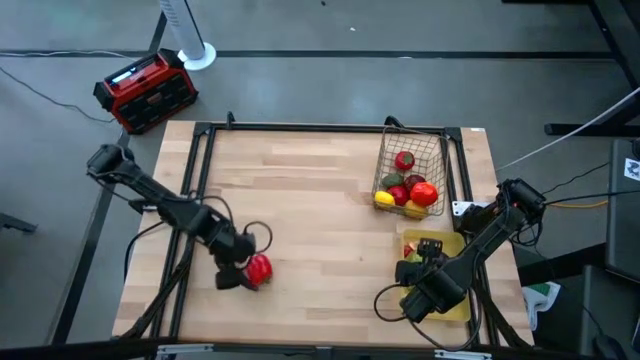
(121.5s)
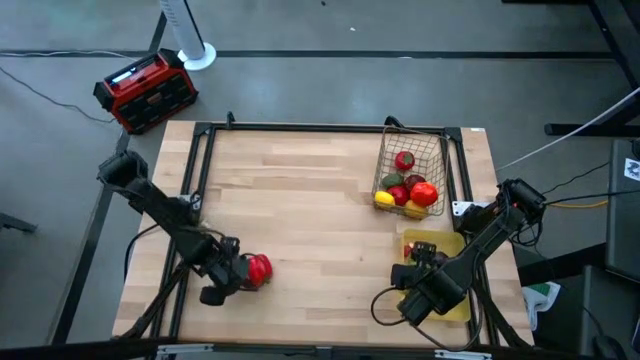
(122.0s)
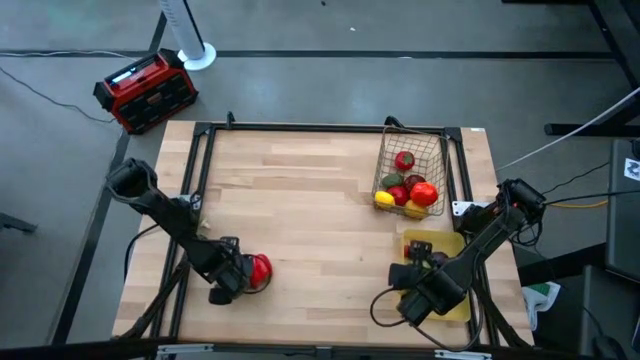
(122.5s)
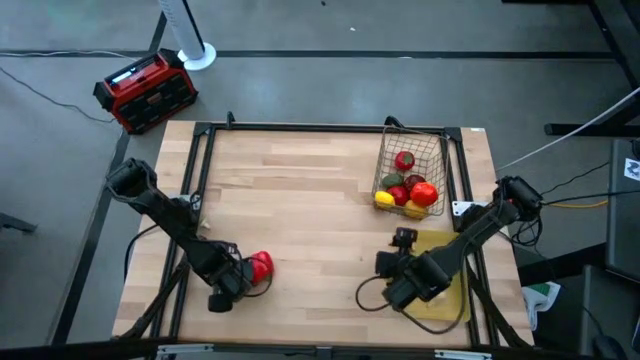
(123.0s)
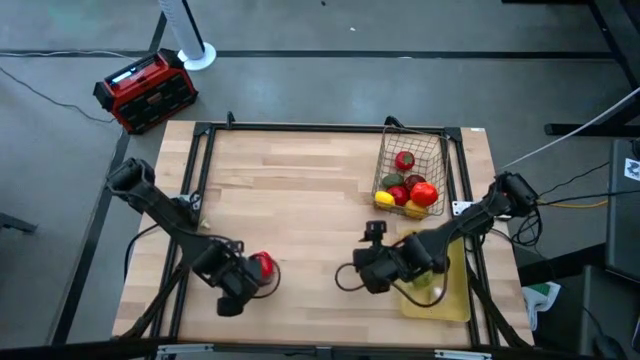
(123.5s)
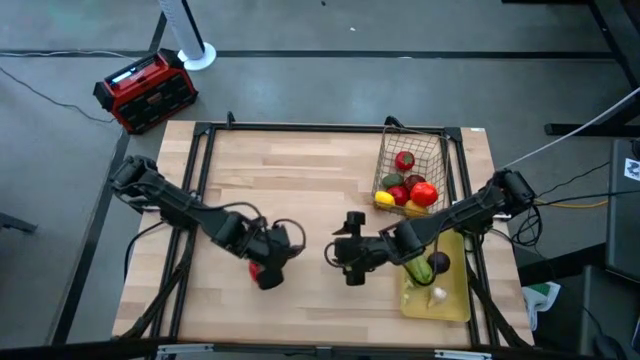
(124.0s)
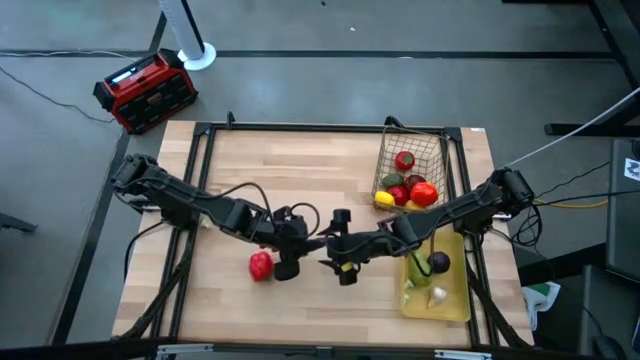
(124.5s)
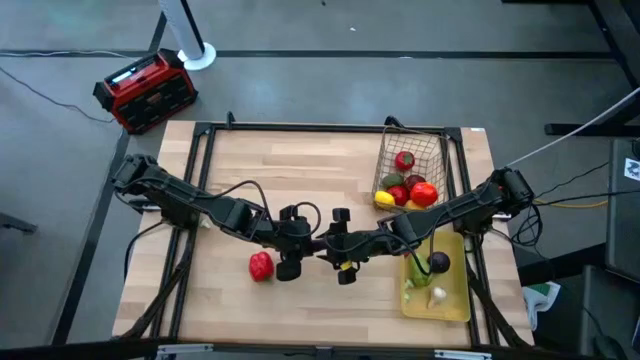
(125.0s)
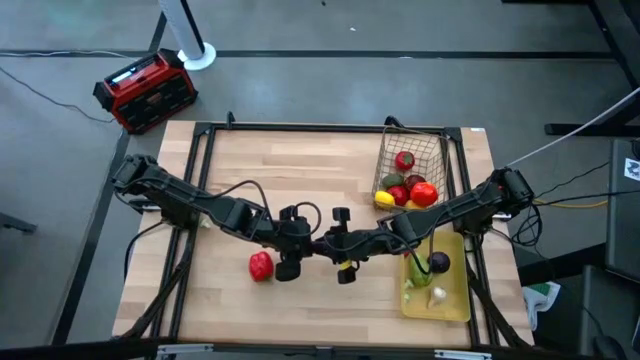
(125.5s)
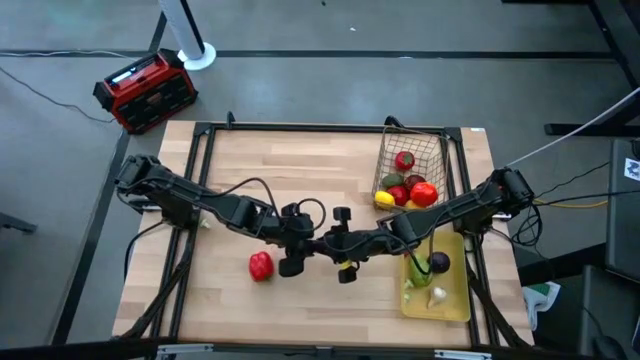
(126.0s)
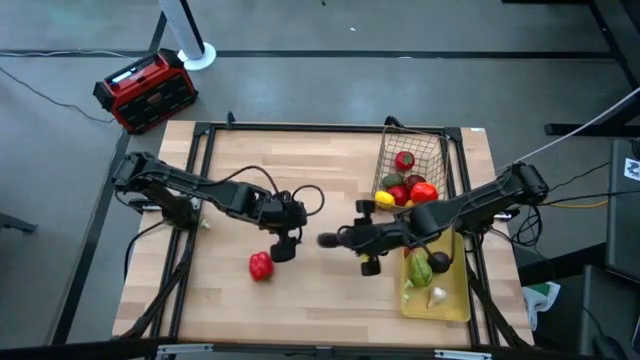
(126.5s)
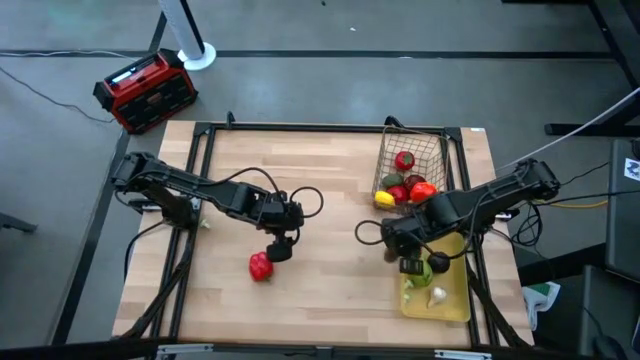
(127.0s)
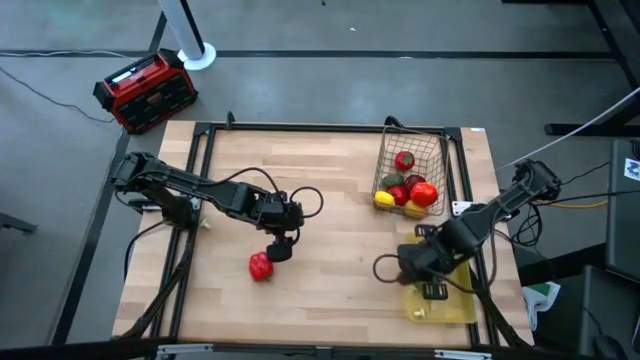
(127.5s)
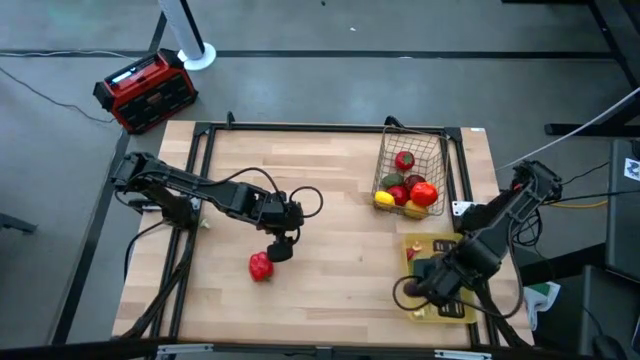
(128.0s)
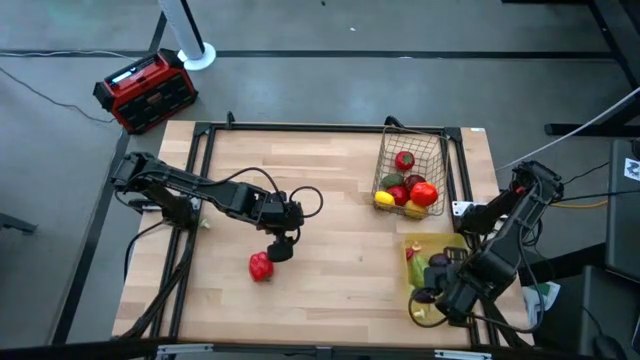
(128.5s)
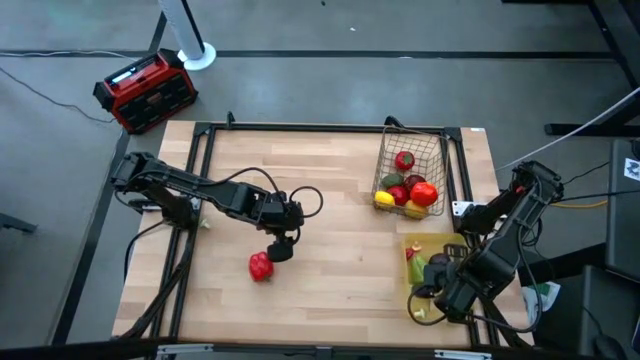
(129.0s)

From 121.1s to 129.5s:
Task: Sort produce into baskets
Put the eggplant into the yellow bin

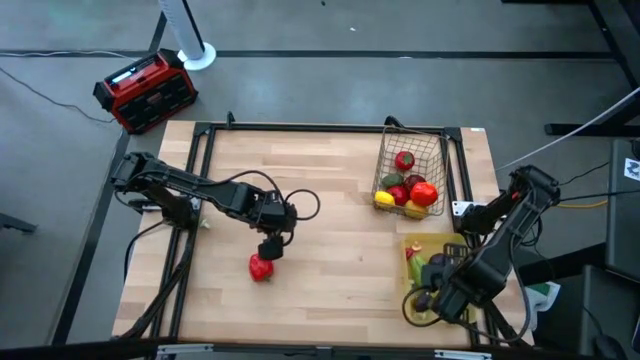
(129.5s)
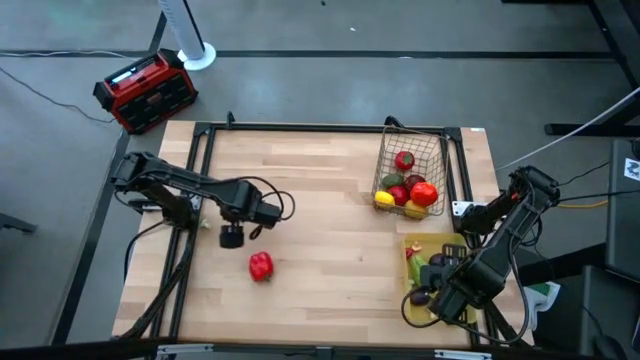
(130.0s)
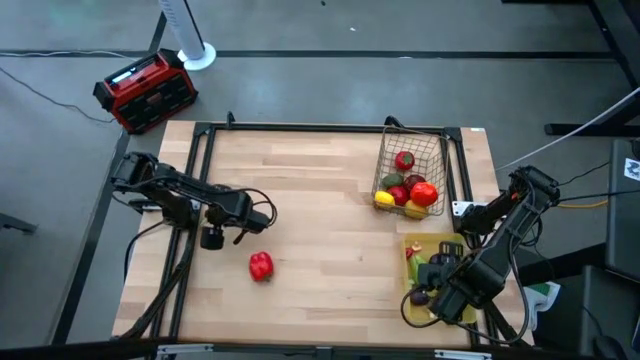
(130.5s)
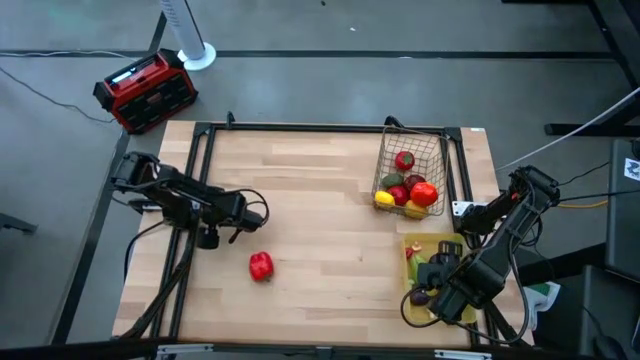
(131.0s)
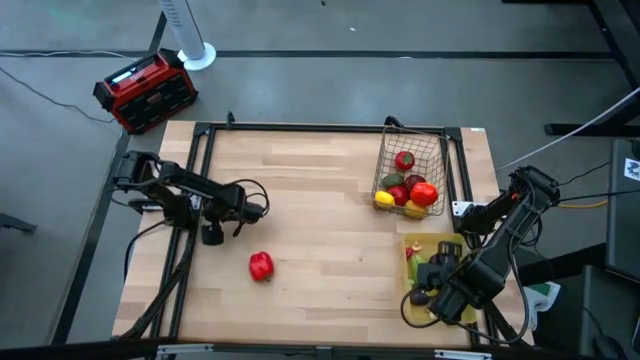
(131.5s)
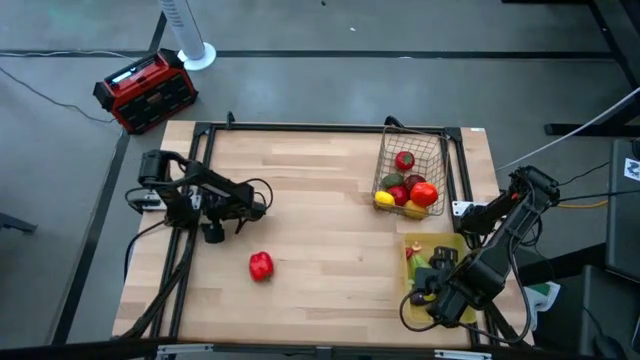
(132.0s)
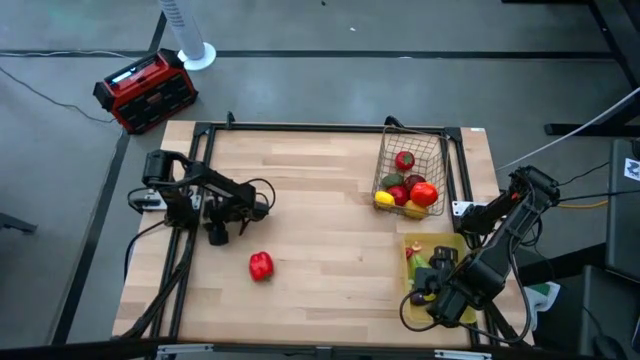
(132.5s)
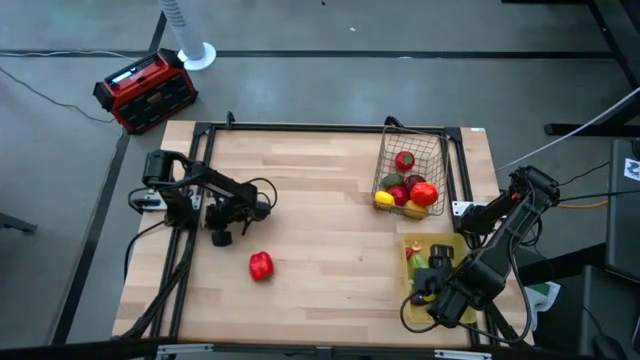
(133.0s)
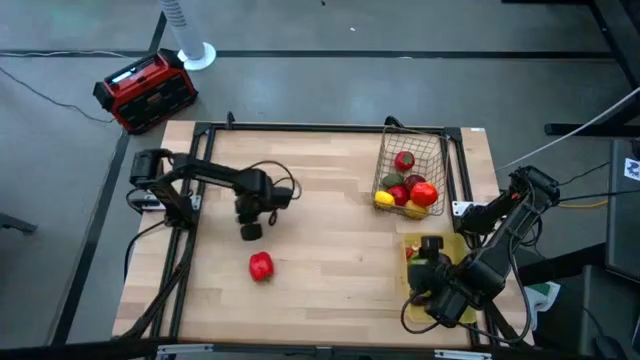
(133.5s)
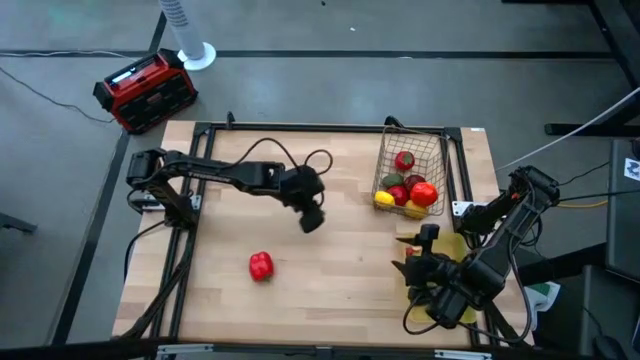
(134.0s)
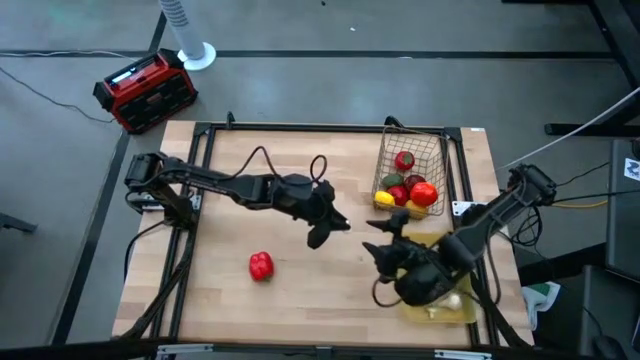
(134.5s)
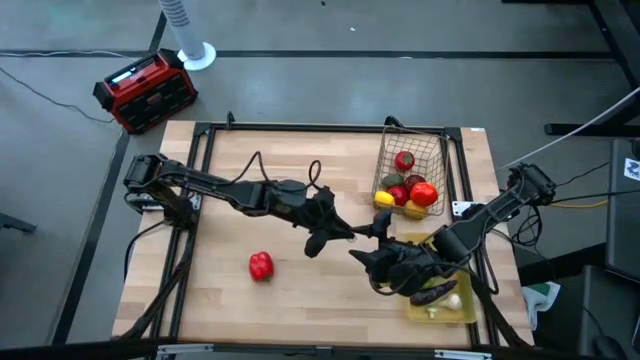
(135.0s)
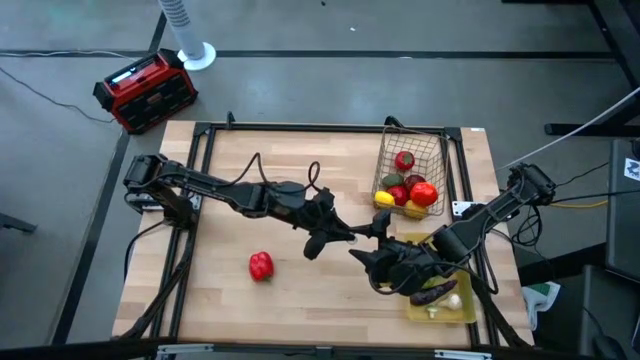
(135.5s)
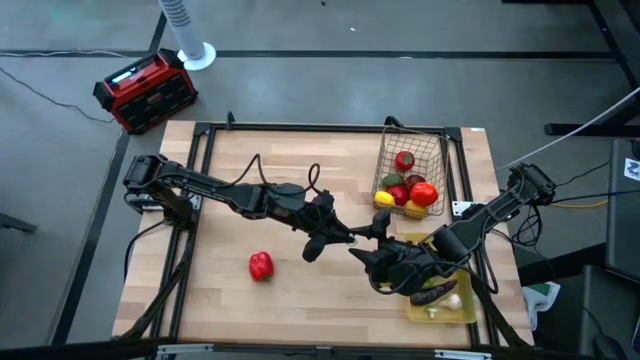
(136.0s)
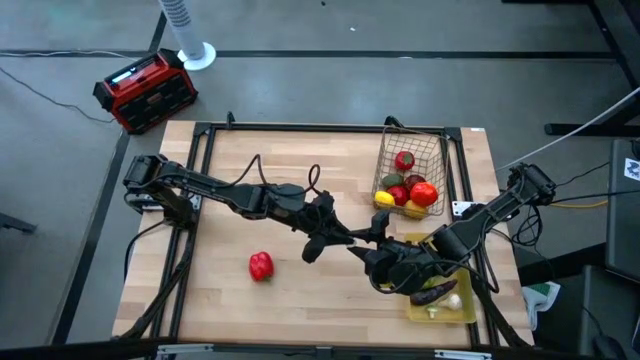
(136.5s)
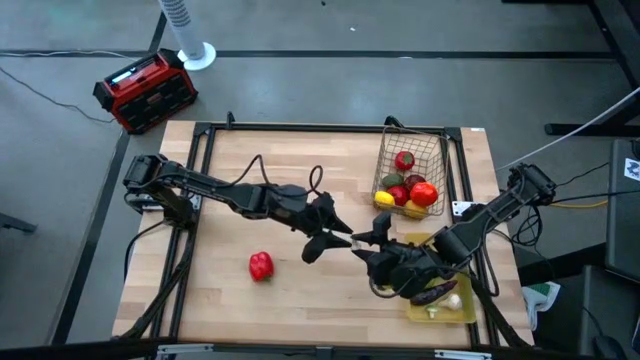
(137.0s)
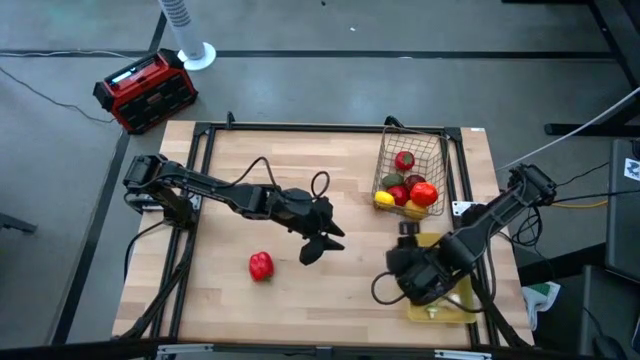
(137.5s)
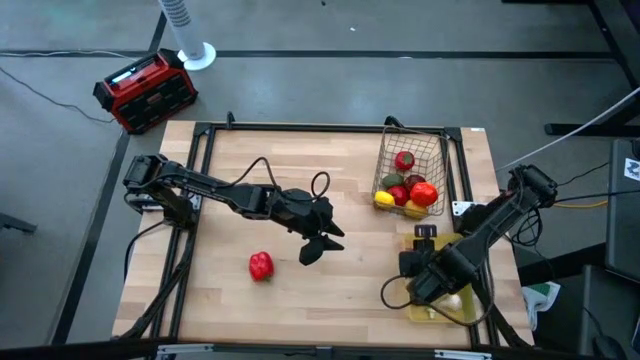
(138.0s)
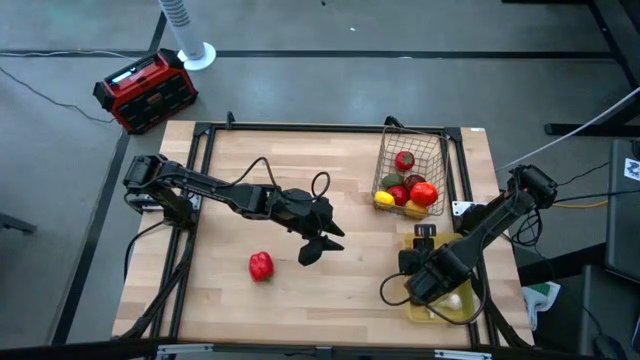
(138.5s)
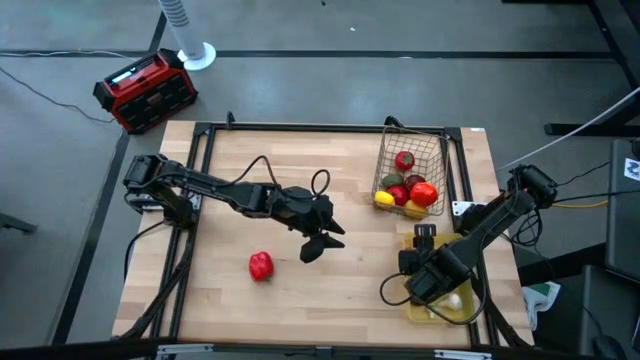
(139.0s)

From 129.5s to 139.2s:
Put the green mushroom into the yellow bin

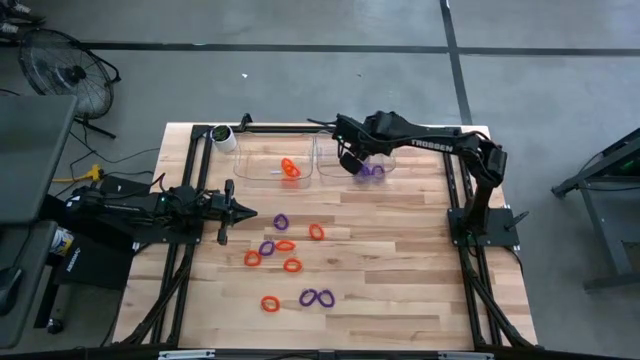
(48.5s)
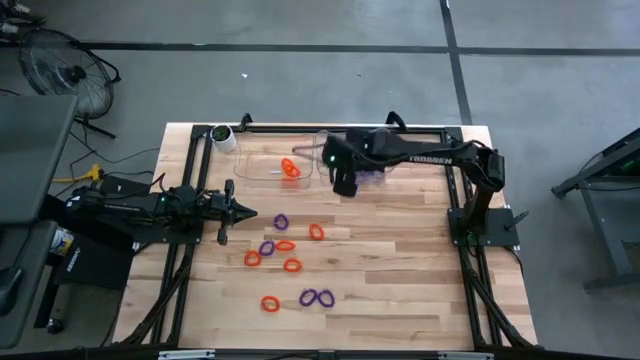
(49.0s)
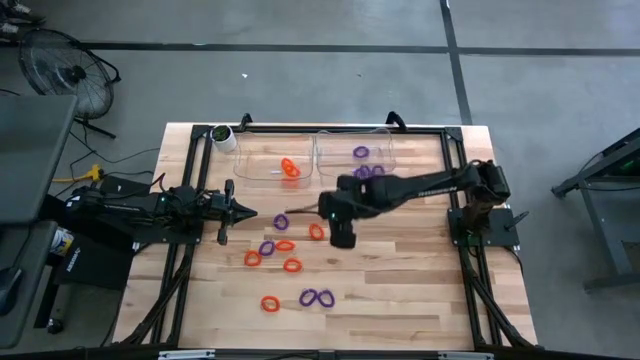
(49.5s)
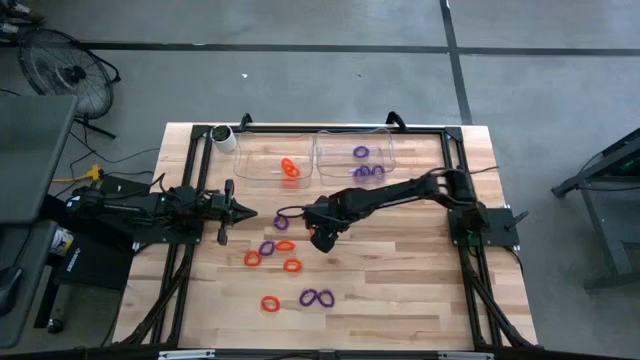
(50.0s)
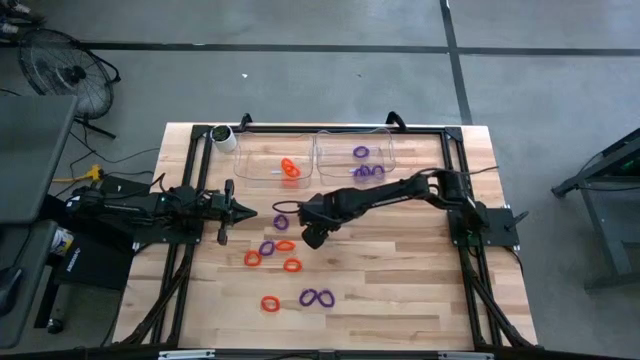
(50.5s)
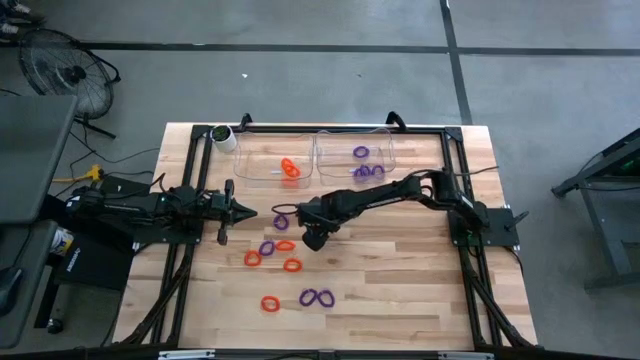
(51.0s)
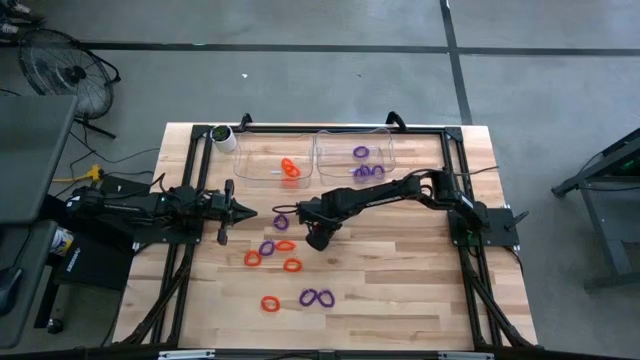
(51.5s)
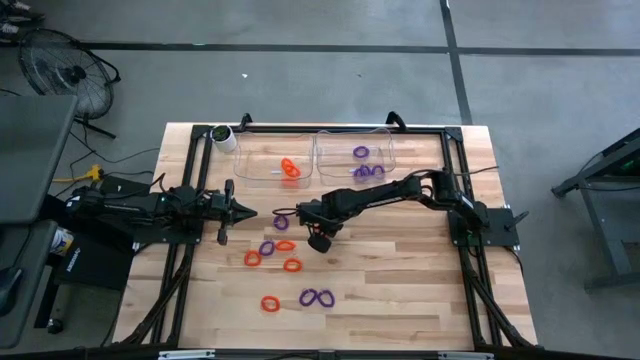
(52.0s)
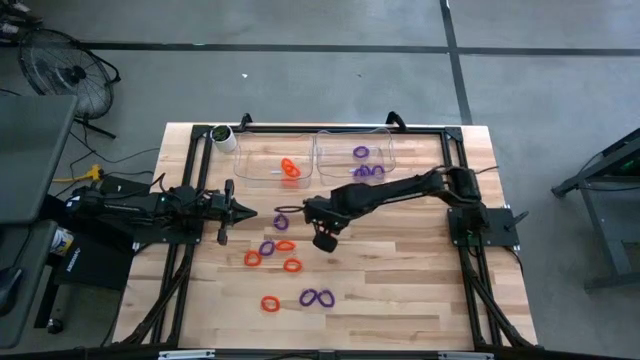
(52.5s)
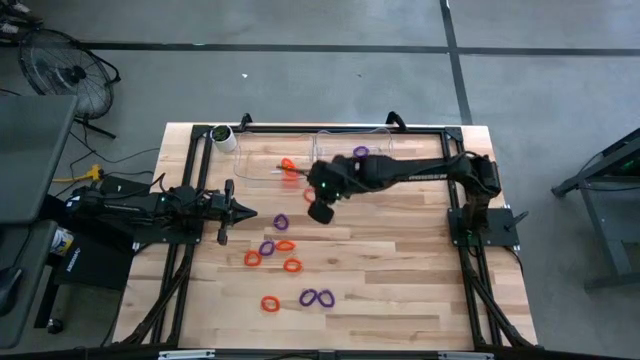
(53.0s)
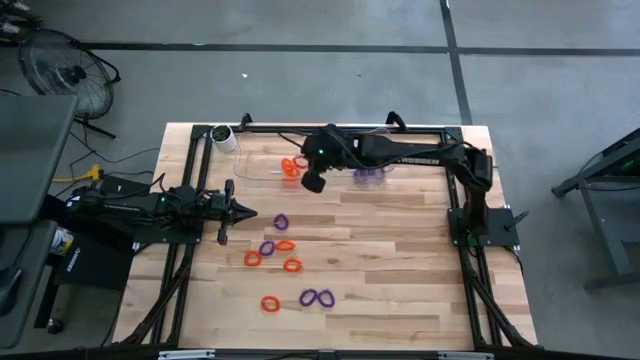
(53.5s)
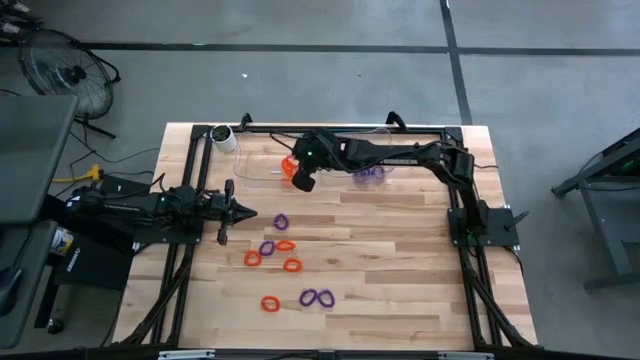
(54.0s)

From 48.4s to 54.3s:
Task: Sort spring keychains
Put the orange spring keychain into the left bin
